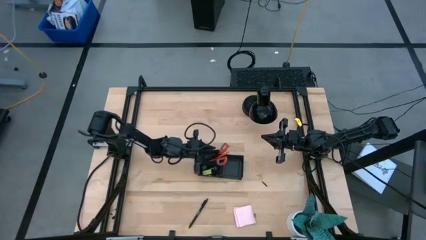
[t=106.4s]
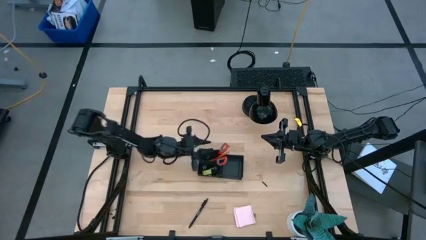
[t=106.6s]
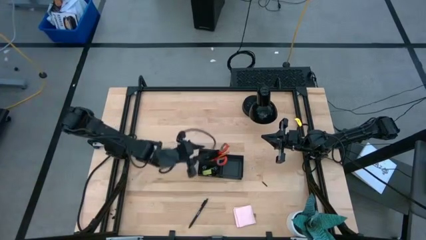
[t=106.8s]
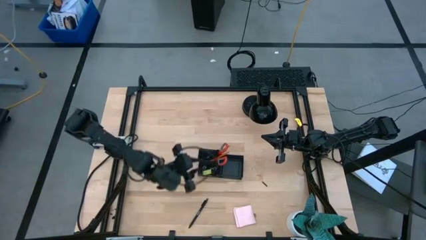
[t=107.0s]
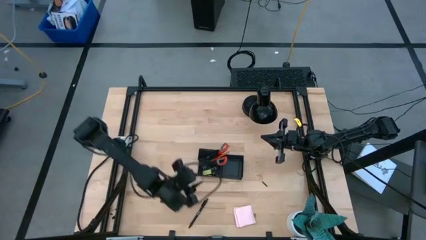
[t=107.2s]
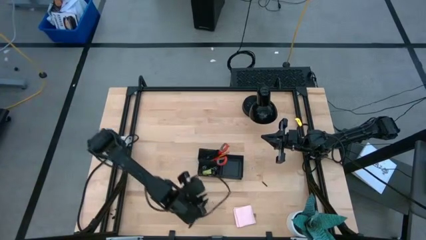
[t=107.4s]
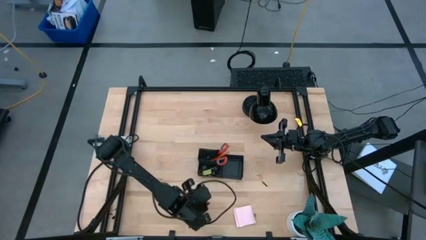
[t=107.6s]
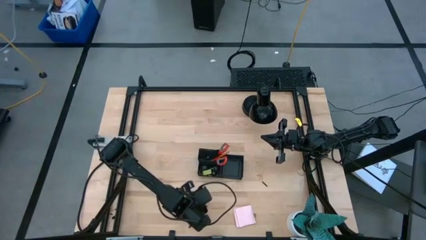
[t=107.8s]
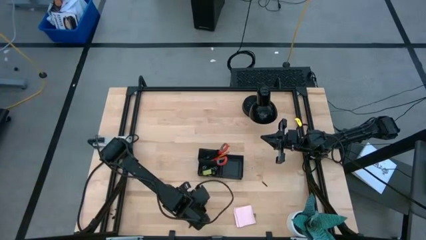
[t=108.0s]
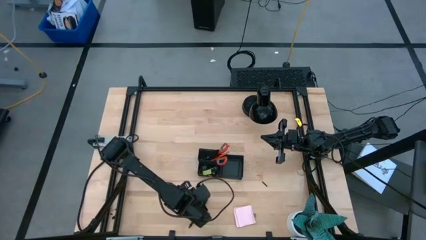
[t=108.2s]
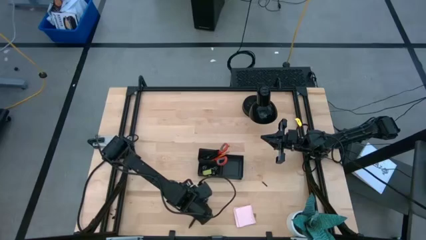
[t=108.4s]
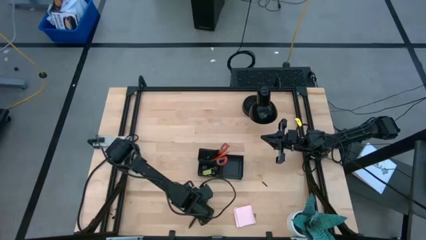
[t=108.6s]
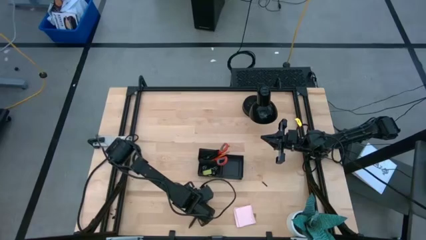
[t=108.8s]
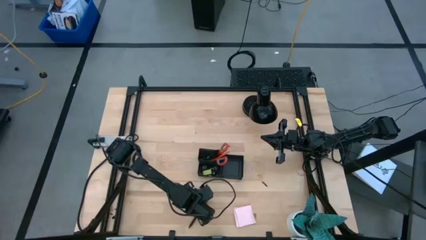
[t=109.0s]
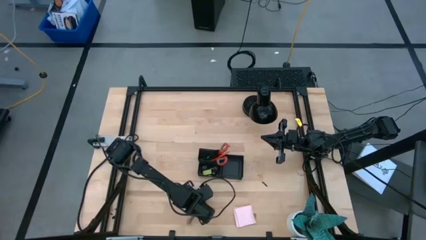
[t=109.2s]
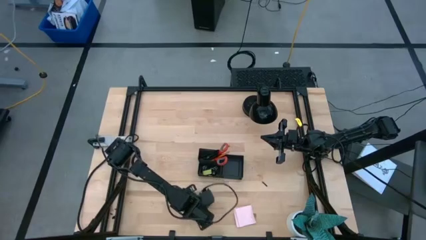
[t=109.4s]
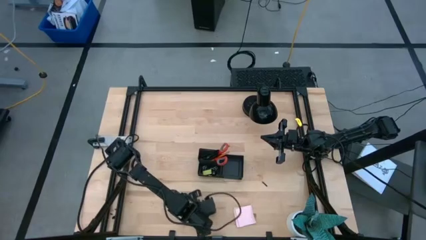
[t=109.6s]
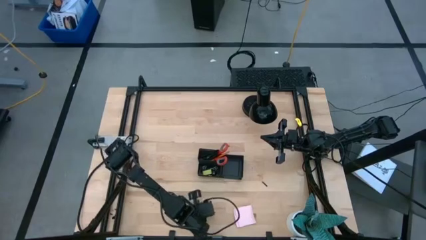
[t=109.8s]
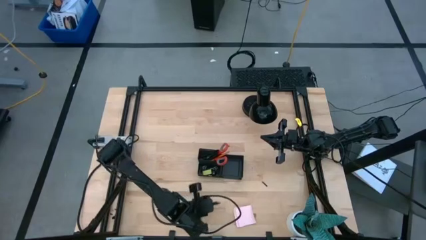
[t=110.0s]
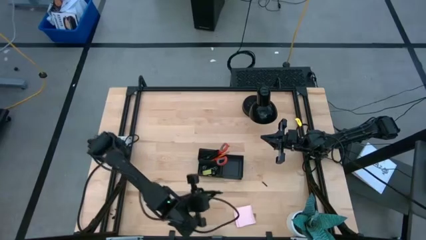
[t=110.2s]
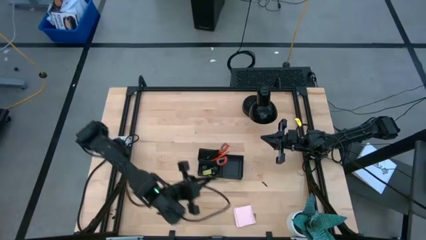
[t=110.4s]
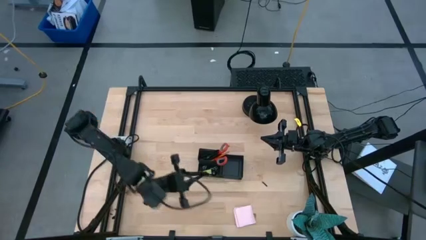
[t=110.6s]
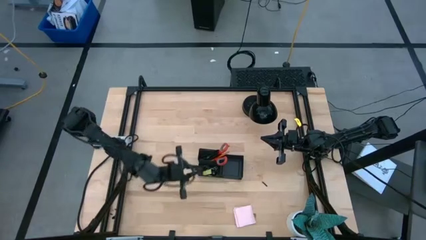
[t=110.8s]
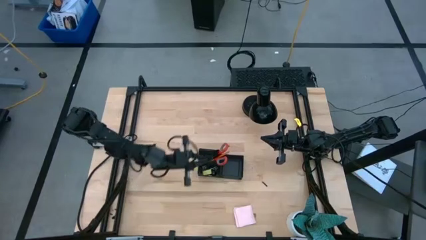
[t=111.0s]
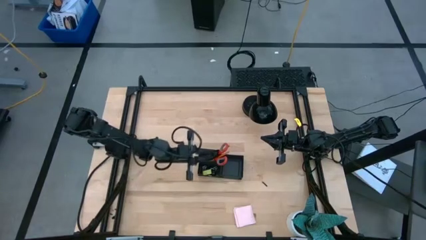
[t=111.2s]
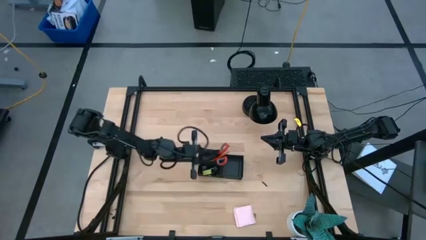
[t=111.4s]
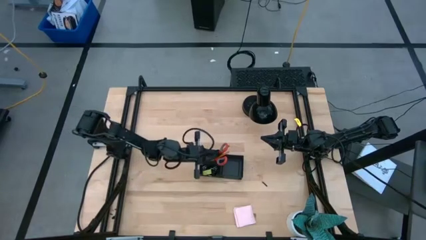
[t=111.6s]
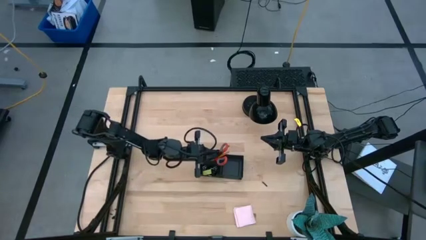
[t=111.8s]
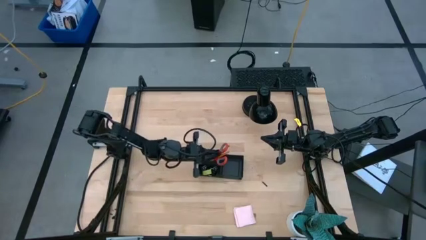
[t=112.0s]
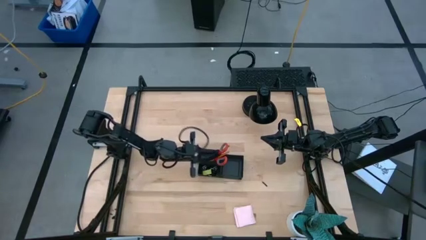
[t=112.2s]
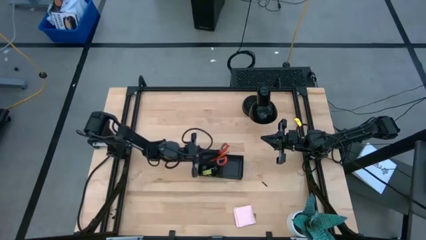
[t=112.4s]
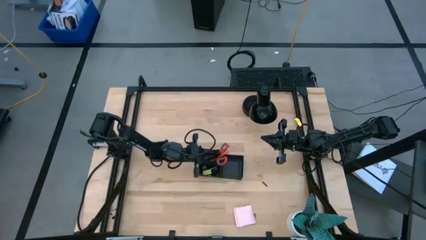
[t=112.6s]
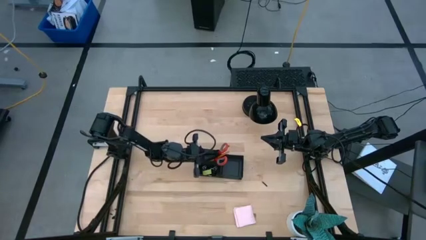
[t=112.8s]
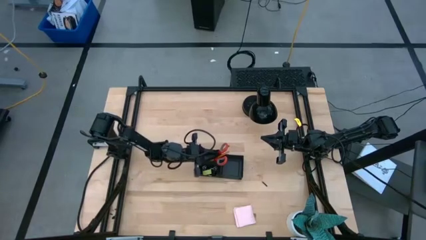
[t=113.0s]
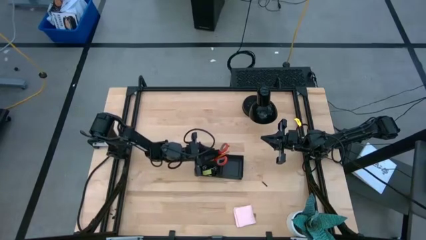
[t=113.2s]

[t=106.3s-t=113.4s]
Task: Pick and place office supplies into organizer
Put the black pen into the black desk organizer

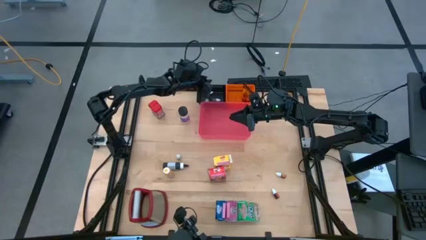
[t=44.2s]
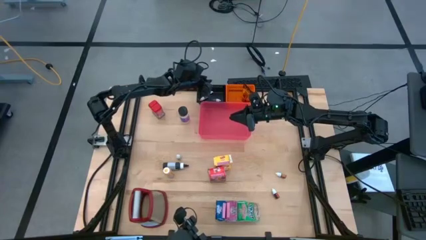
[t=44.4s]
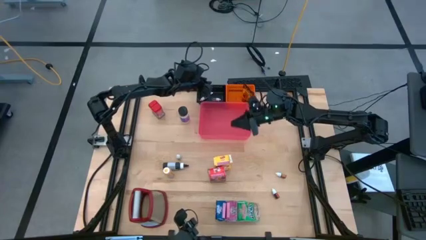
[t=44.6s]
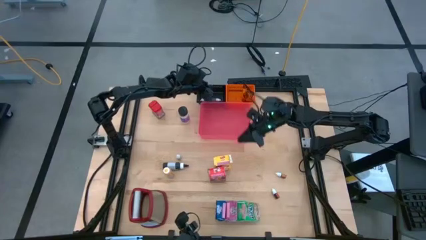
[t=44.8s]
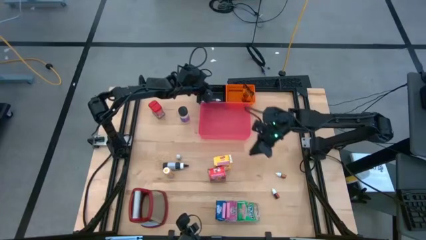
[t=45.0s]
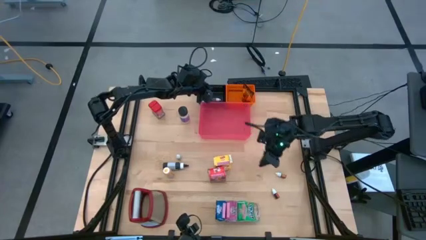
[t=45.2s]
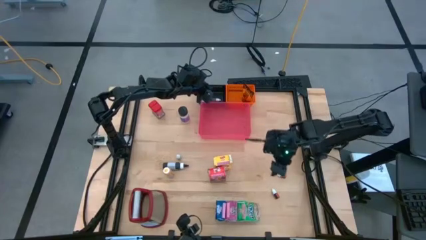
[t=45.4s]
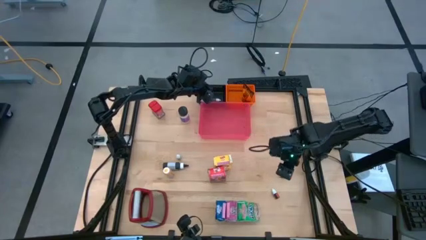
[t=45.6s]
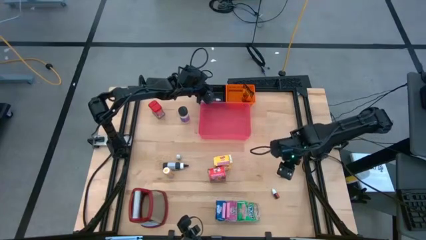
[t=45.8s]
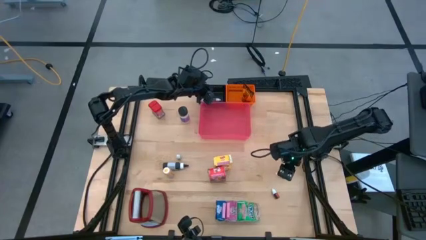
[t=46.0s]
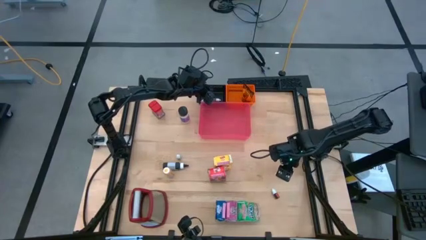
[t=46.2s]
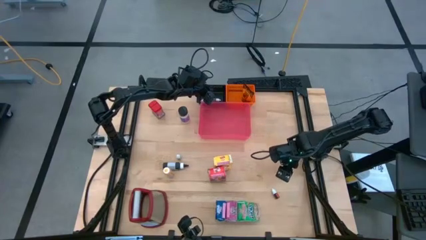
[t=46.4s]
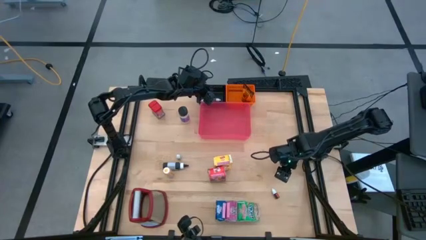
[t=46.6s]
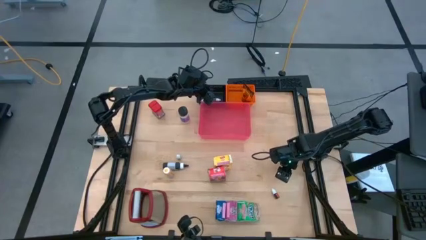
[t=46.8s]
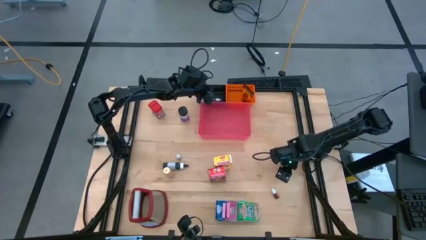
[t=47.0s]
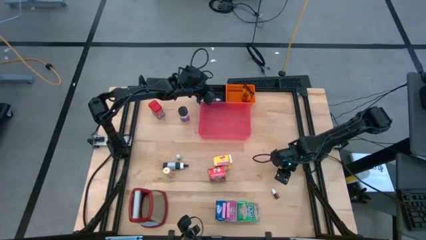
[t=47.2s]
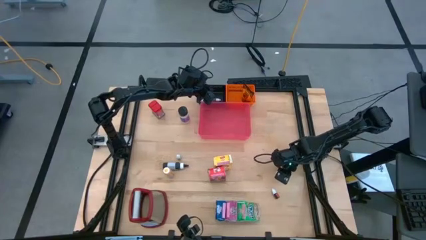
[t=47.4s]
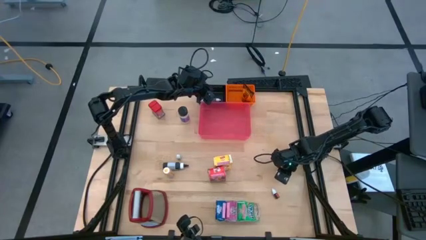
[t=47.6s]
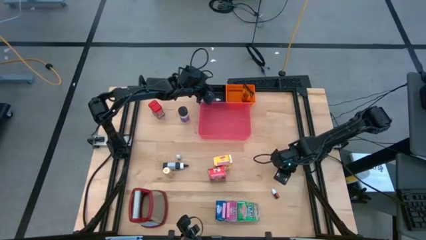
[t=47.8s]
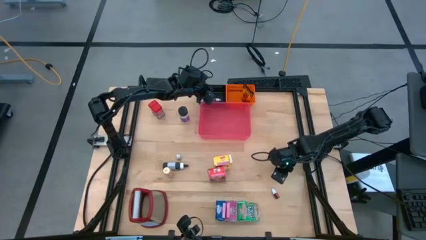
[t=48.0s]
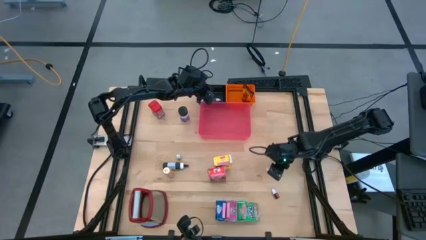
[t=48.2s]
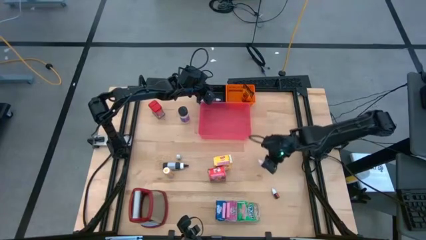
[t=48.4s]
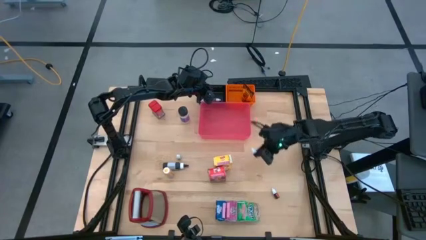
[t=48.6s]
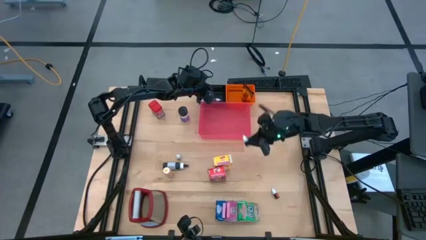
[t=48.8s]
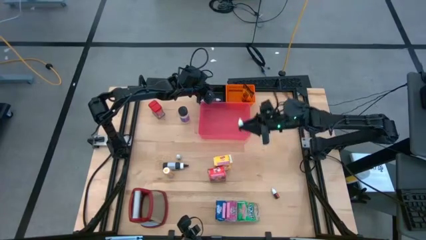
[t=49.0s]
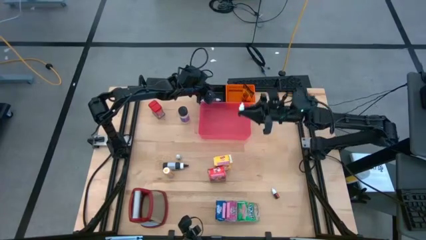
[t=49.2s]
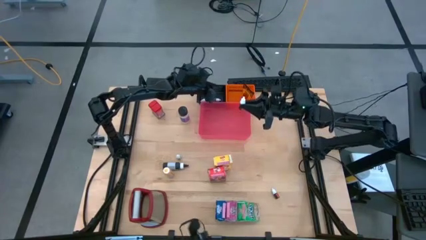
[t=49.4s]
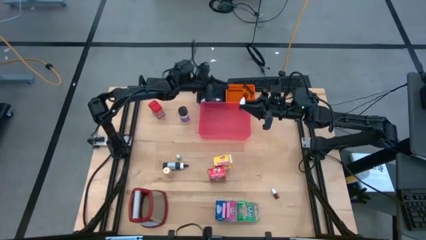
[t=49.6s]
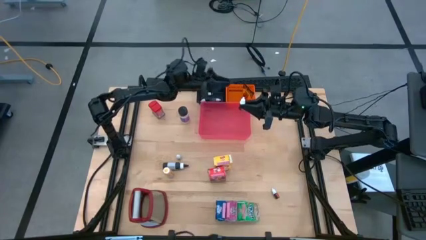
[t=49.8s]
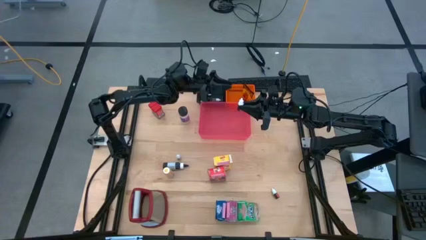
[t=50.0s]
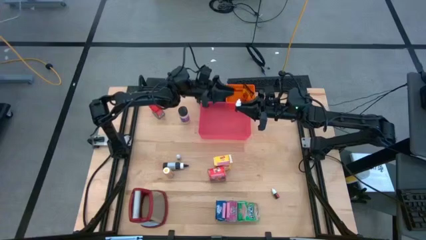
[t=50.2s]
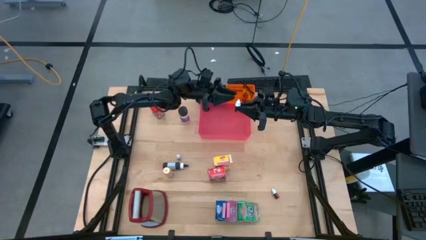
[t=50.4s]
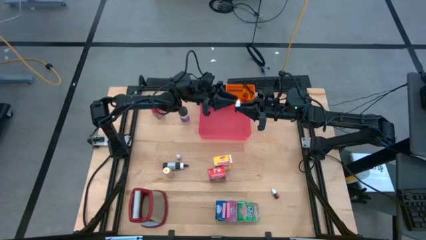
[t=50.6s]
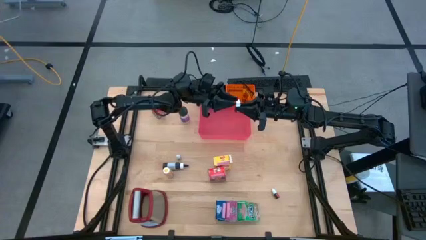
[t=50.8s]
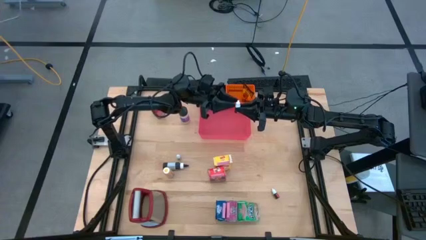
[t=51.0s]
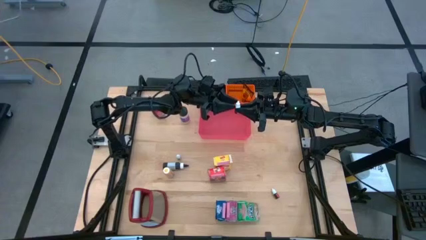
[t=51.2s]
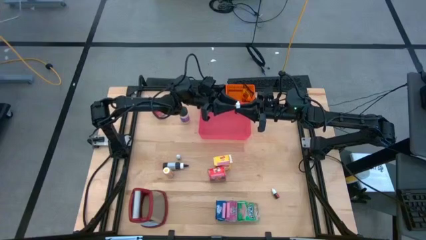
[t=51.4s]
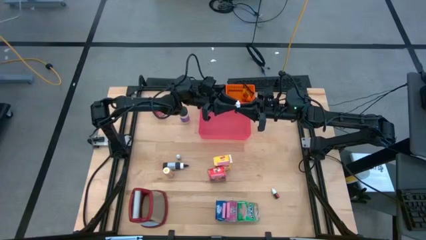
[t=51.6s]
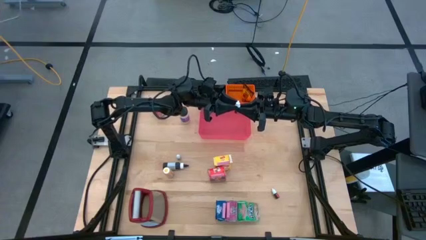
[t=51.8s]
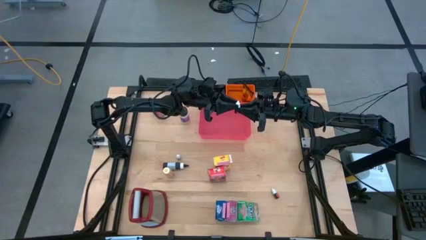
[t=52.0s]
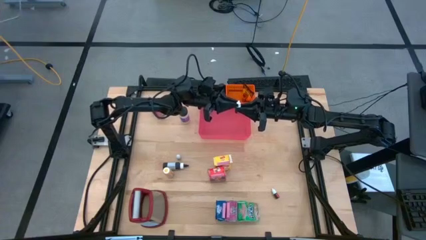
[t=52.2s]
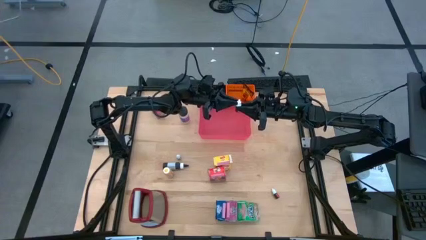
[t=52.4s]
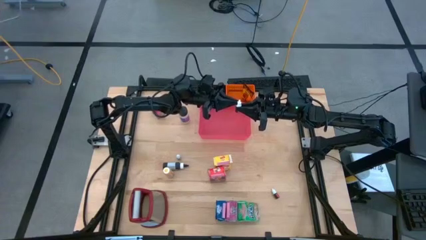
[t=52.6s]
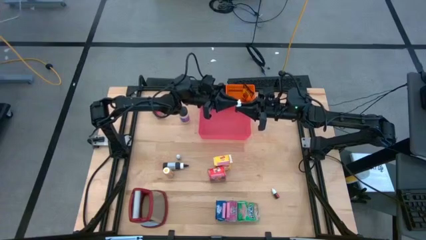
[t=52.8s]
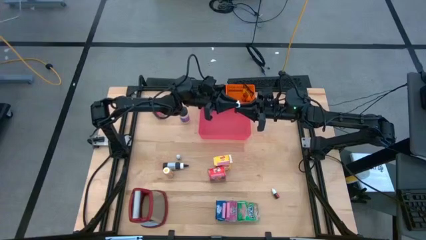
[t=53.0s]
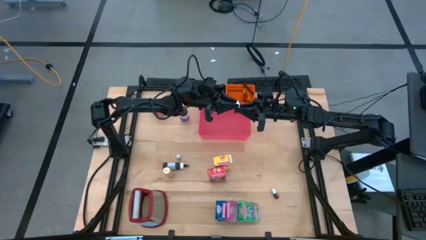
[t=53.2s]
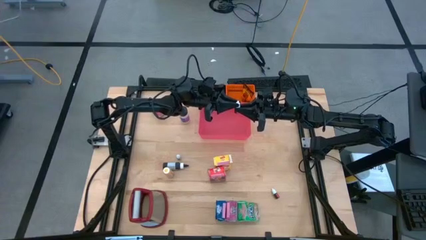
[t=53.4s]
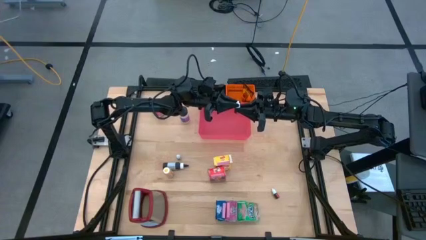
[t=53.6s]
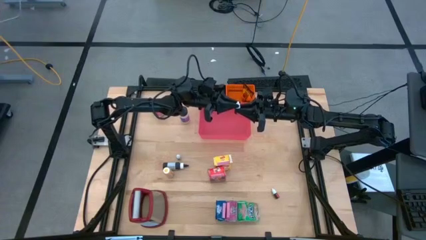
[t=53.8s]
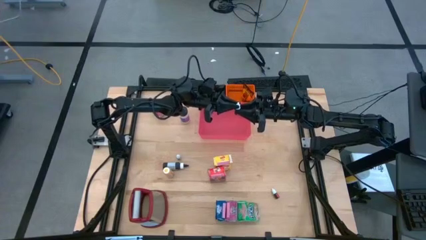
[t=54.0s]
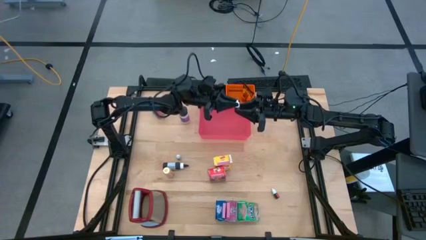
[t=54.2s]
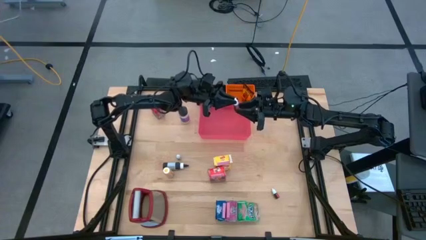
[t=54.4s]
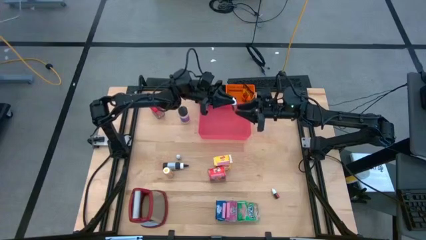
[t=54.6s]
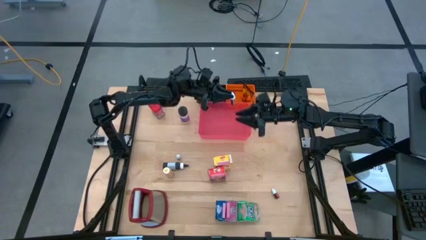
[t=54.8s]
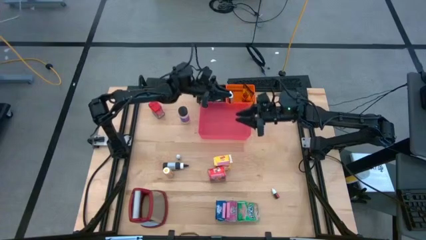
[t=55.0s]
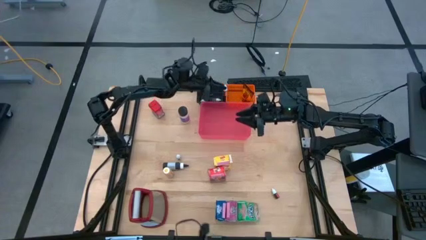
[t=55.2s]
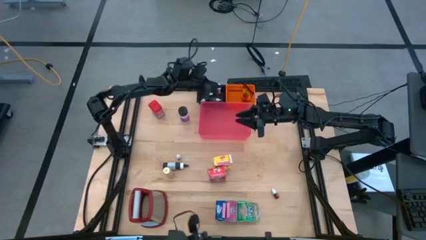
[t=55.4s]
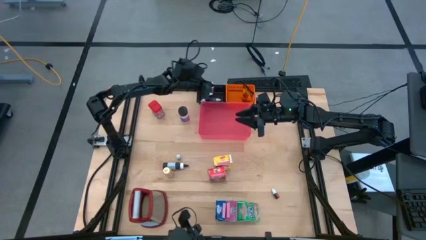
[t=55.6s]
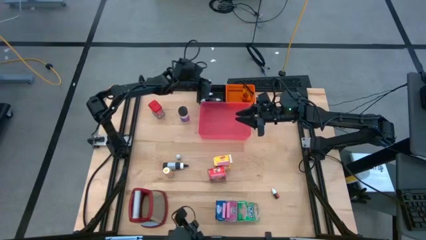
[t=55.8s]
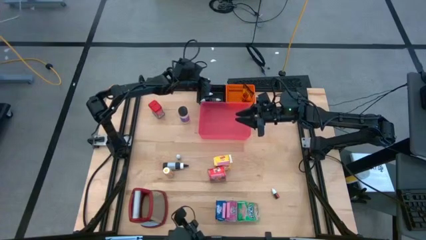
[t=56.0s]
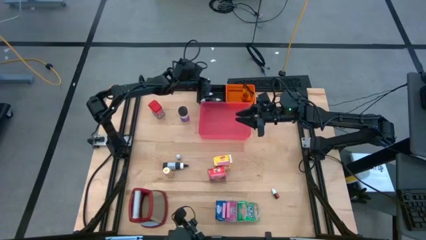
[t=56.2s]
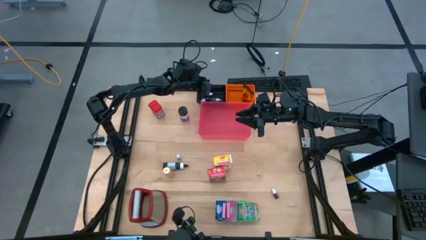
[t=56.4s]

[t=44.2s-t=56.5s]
Task: Pick & Place Kitchen Items
Put the small orange food coloring bottle into the black bin
